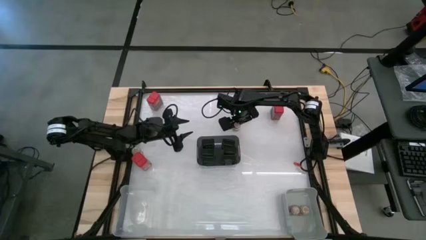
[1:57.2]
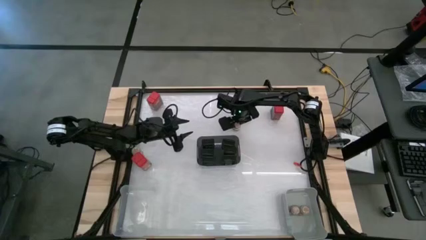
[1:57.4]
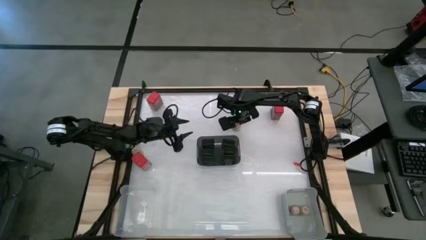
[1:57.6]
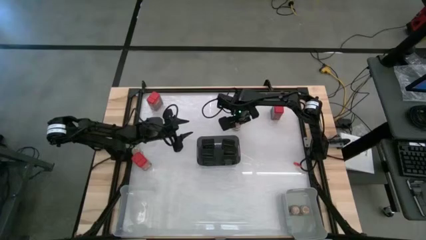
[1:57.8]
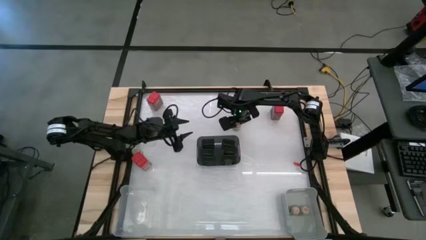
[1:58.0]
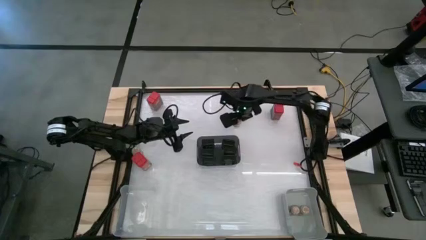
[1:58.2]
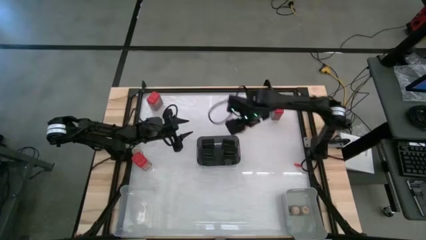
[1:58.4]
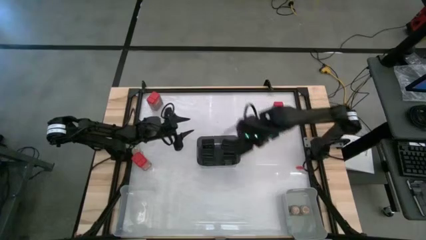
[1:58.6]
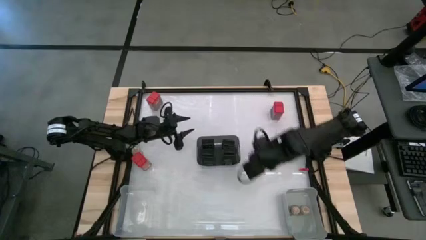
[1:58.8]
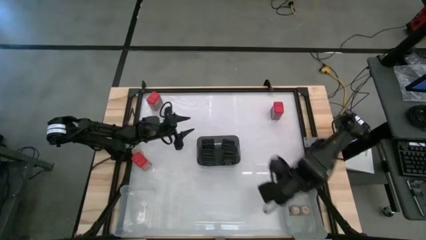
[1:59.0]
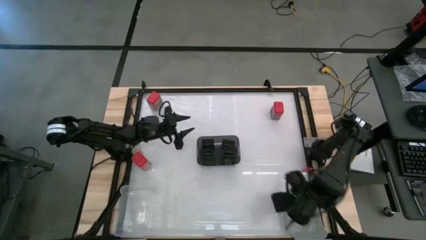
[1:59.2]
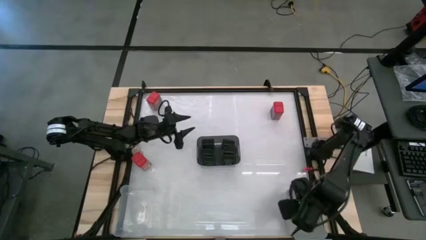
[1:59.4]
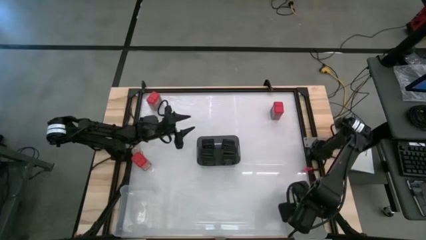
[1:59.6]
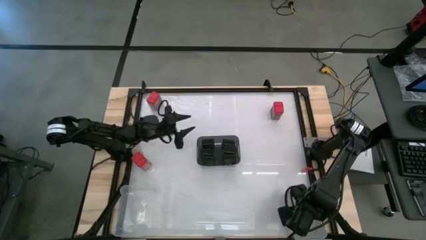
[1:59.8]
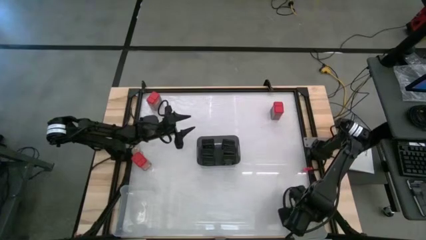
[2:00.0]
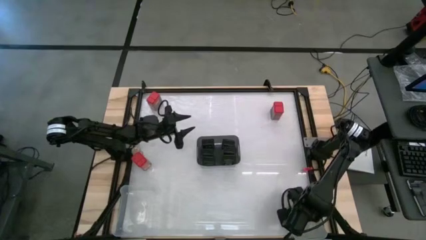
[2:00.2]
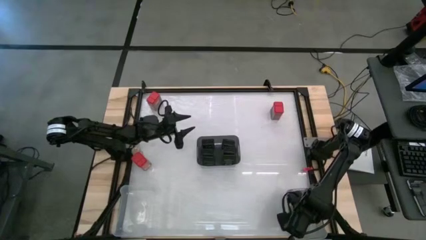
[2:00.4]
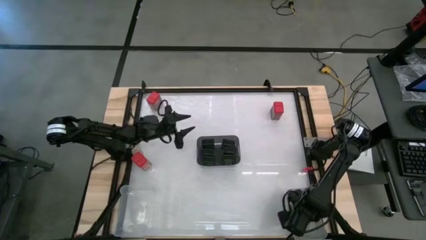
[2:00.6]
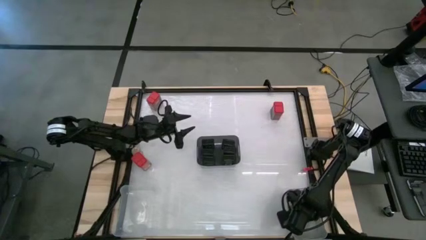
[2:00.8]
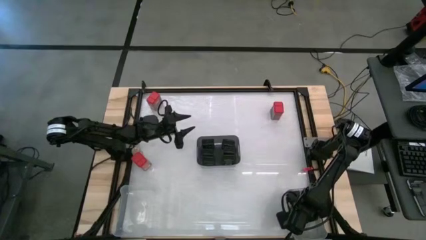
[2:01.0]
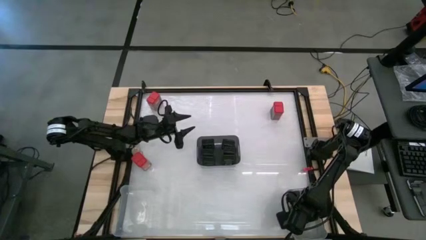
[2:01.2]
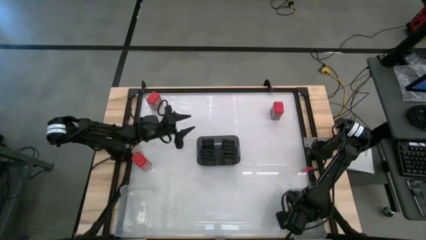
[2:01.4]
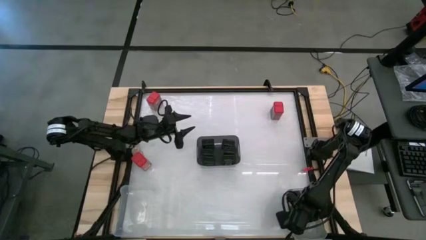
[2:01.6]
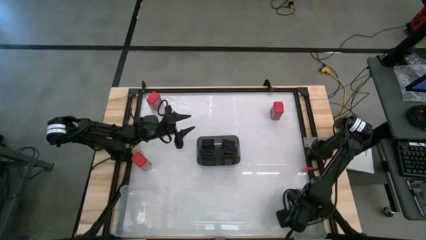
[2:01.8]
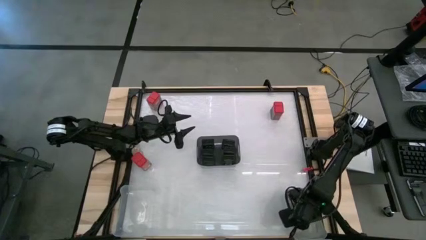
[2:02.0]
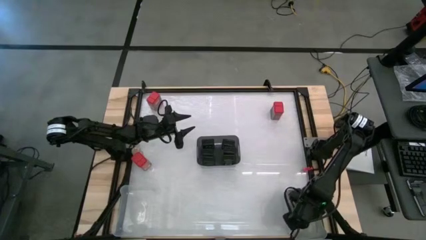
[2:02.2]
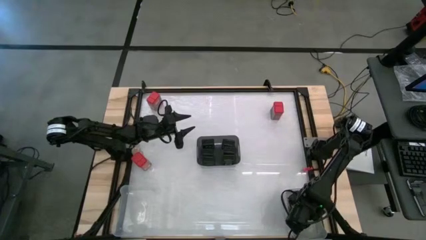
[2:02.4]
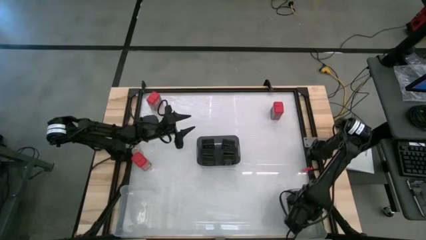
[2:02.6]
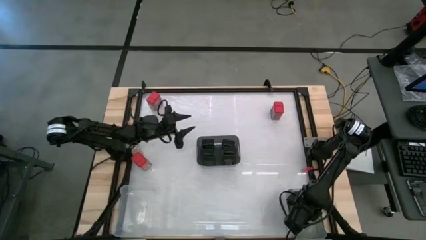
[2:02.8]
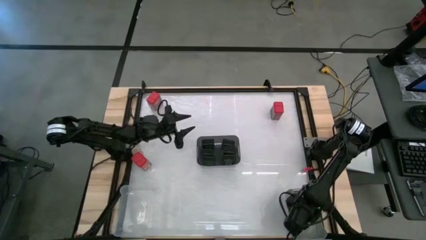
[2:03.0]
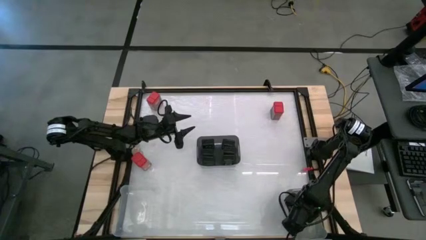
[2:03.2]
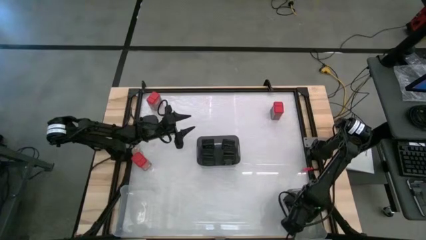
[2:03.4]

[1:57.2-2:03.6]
Task: Sort spices by type
Put the brown seasoning bottle into the gray bin

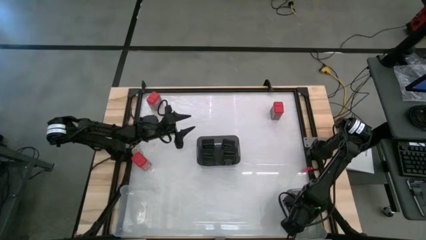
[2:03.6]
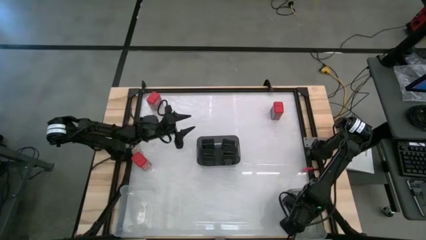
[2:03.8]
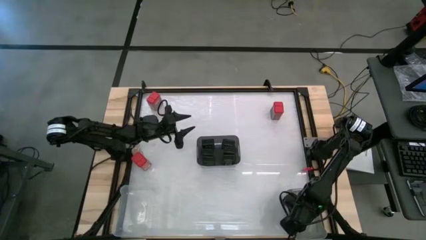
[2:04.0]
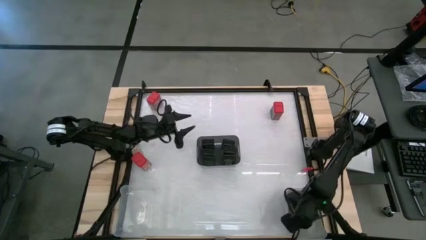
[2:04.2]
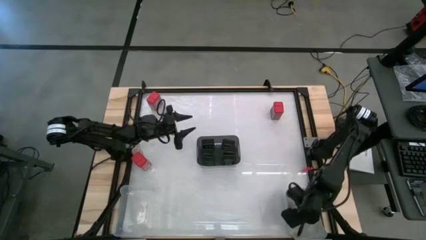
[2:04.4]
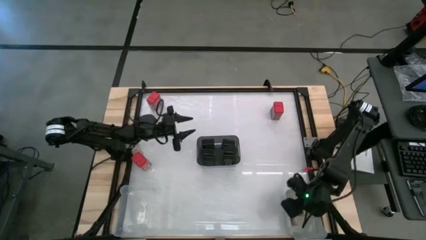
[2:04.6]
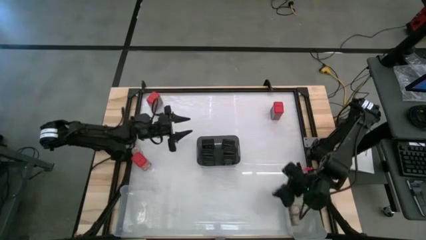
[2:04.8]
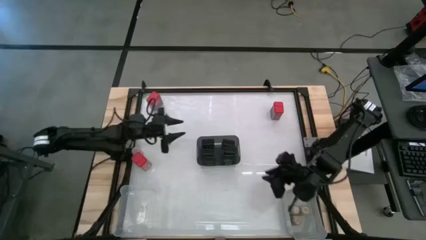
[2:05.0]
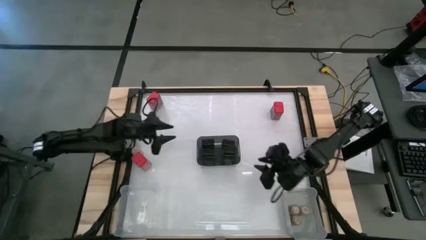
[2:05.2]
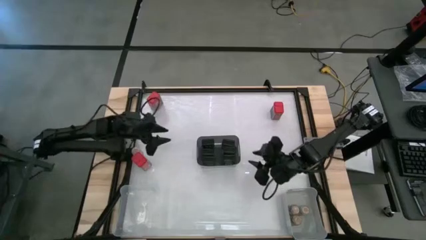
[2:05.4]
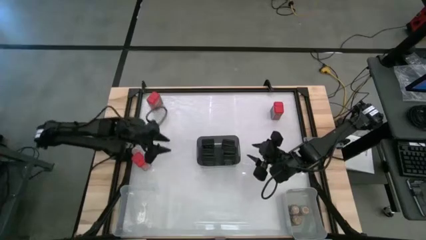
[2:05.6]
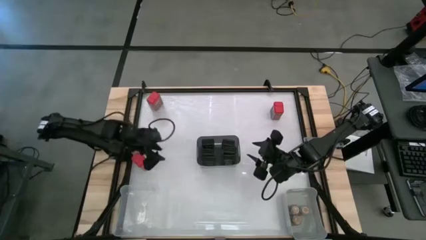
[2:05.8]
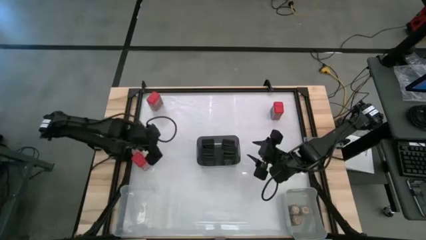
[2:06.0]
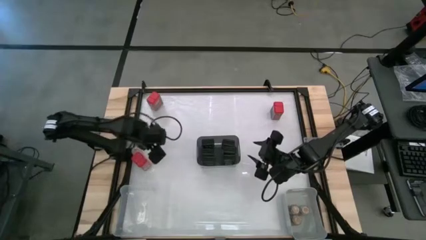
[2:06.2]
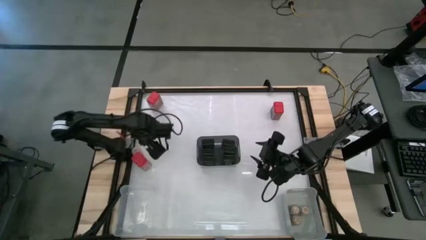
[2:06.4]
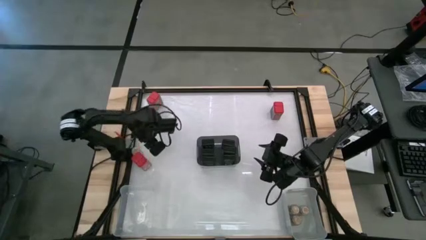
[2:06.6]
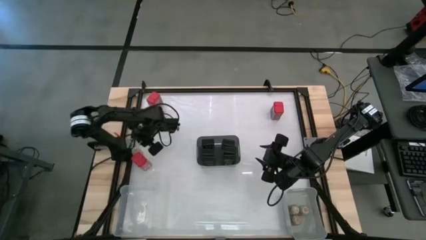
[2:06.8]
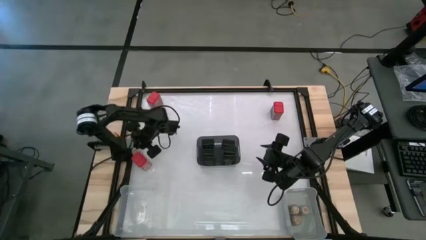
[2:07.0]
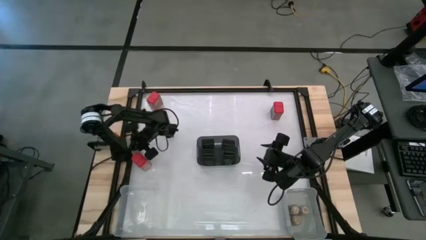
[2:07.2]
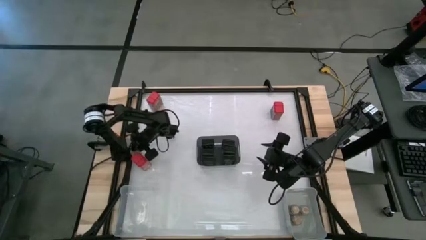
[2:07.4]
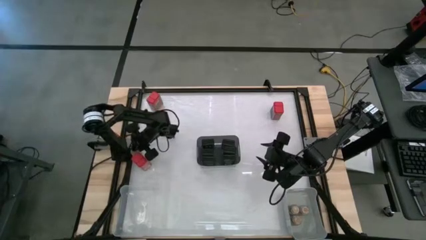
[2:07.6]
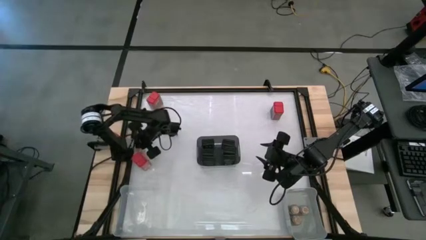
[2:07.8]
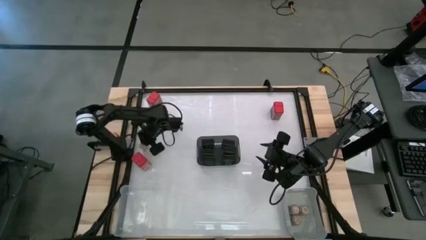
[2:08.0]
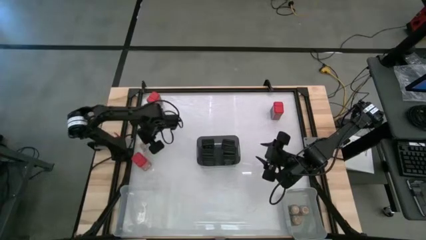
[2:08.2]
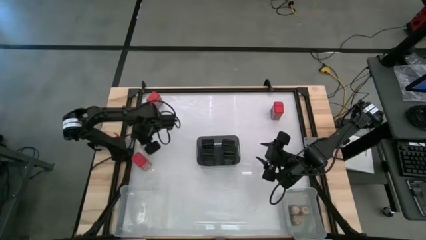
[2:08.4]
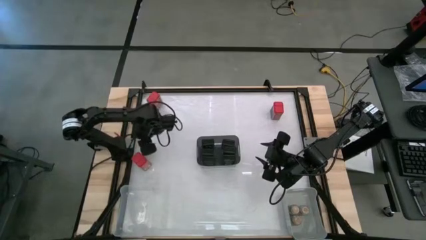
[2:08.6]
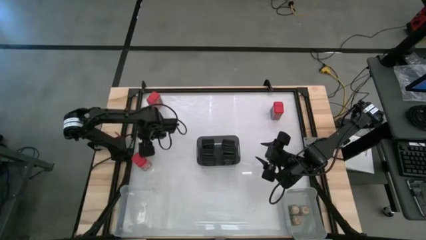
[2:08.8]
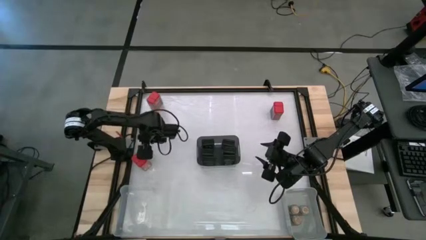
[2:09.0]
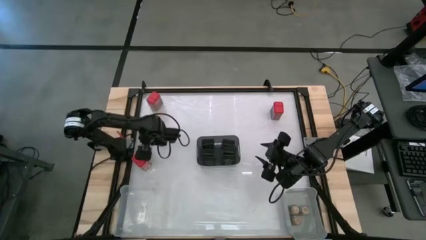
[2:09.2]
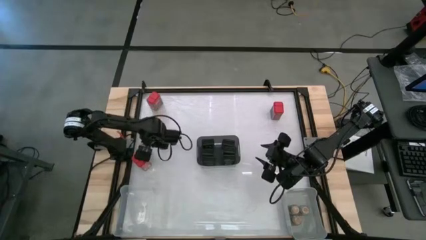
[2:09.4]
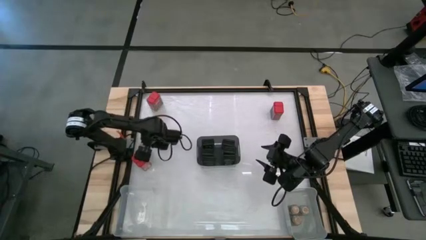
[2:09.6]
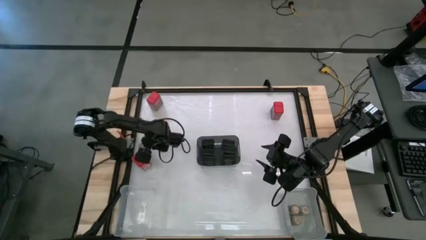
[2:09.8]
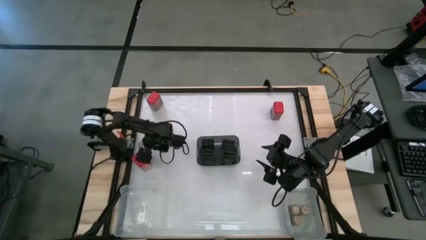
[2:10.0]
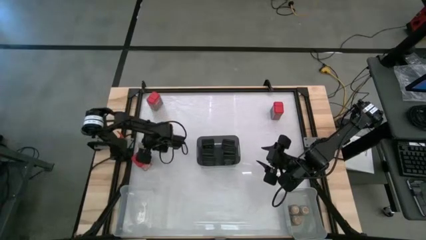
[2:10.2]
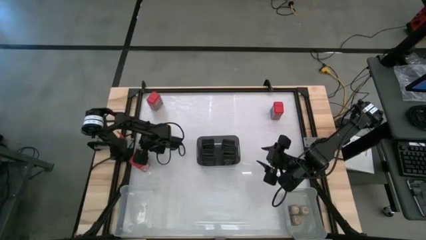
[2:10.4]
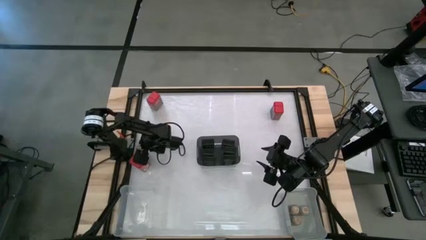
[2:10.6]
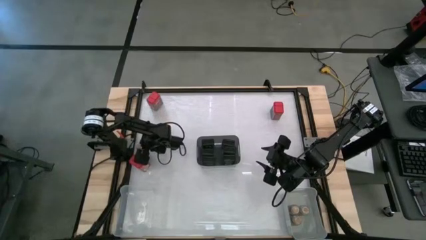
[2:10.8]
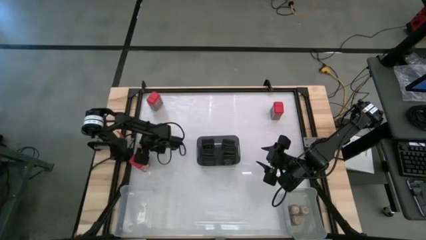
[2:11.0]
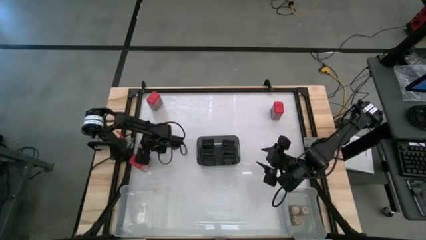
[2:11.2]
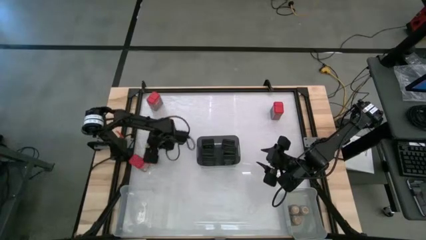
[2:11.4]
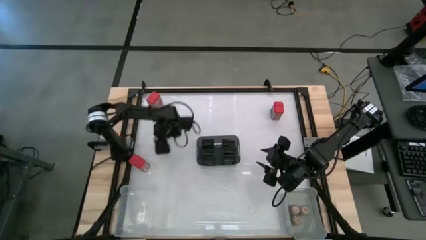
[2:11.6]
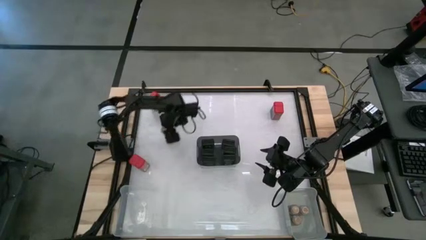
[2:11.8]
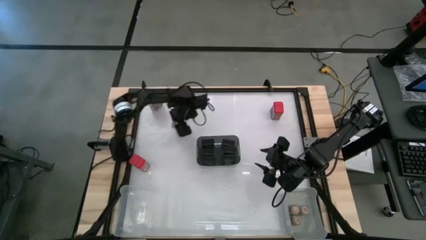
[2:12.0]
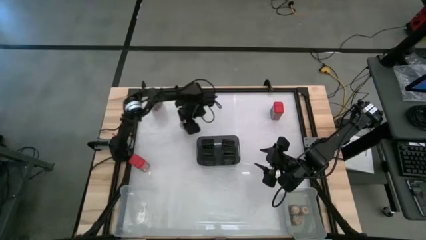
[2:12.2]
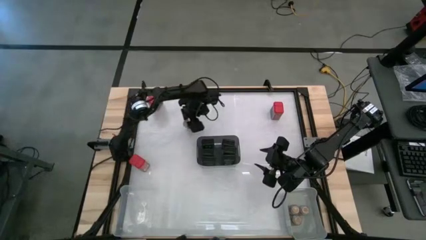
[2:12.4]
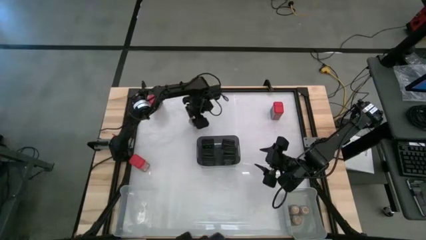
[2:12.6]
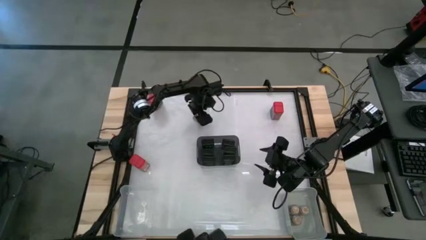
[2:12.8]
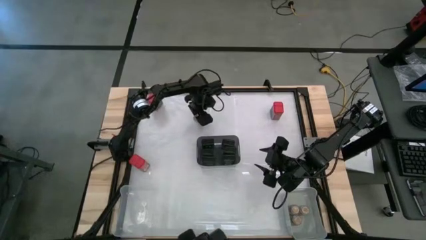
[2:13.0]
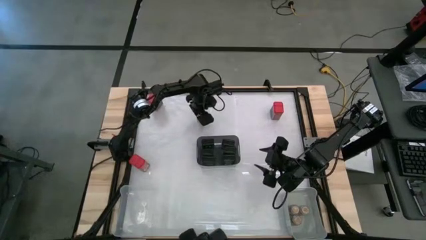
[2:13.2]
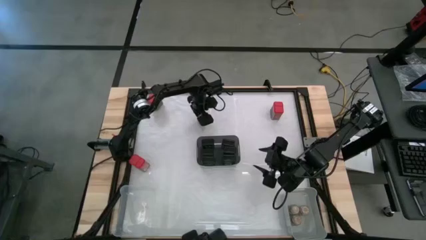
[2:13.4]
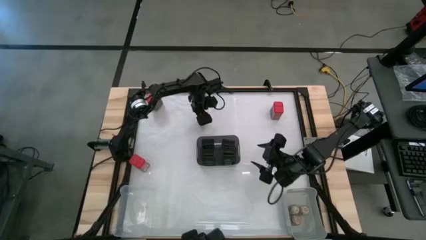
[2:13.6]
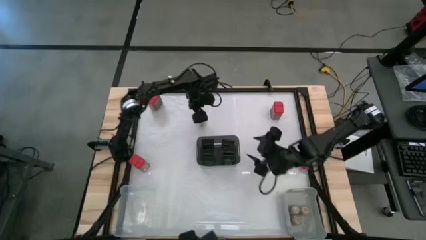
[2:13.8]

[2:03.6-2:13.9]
Put the brown seasoning bottle into the gray bin
